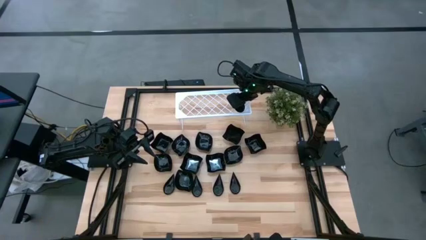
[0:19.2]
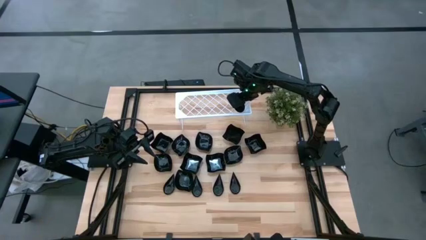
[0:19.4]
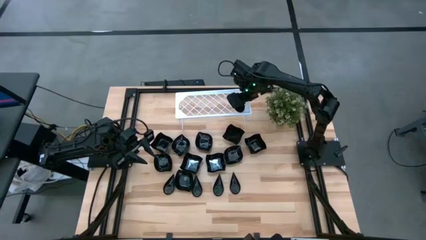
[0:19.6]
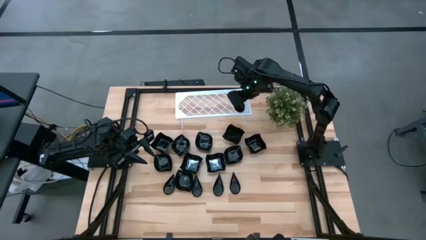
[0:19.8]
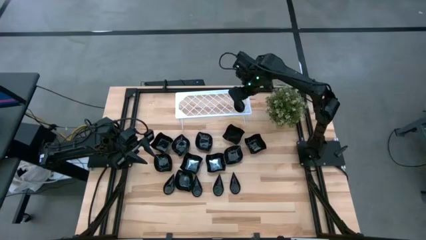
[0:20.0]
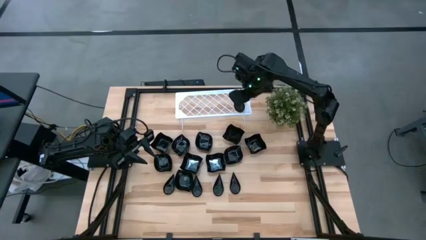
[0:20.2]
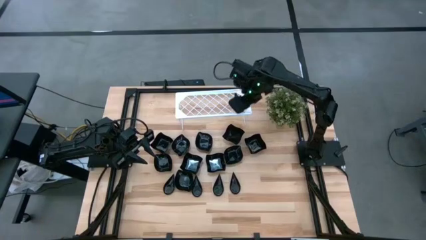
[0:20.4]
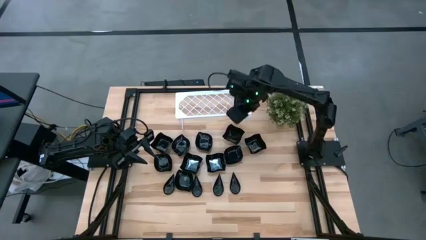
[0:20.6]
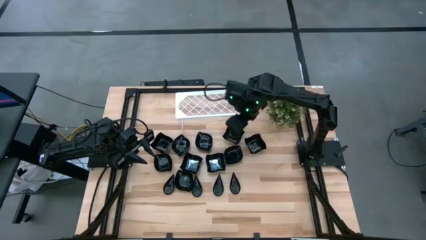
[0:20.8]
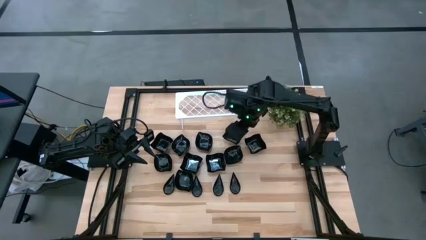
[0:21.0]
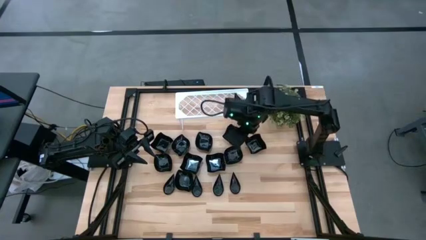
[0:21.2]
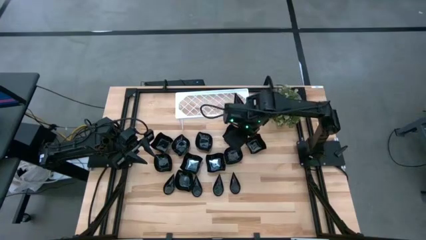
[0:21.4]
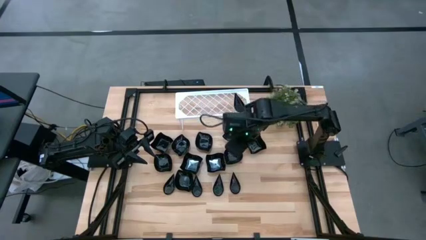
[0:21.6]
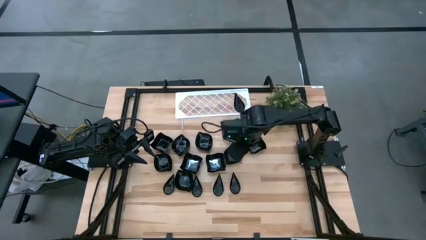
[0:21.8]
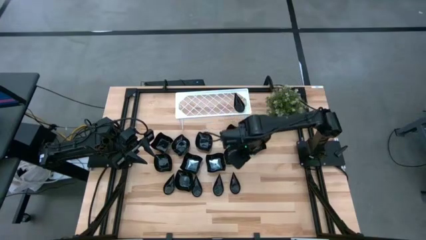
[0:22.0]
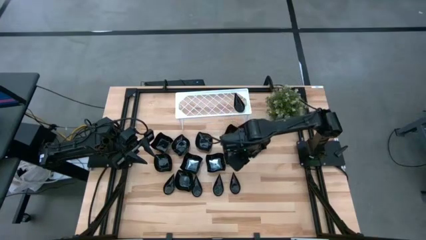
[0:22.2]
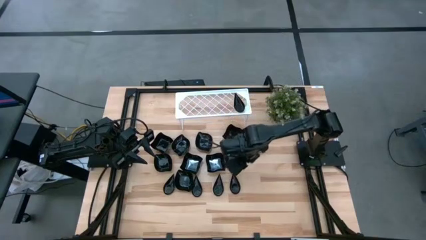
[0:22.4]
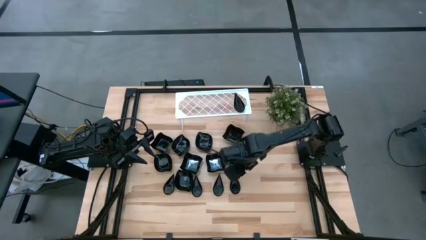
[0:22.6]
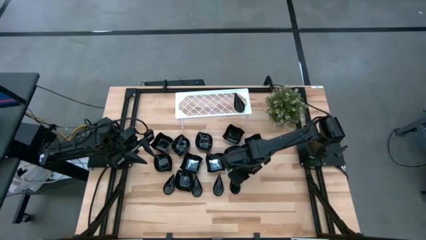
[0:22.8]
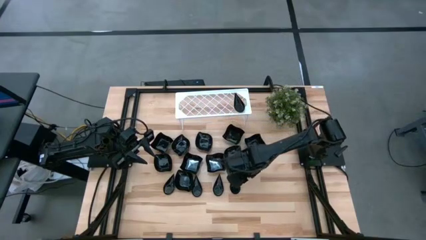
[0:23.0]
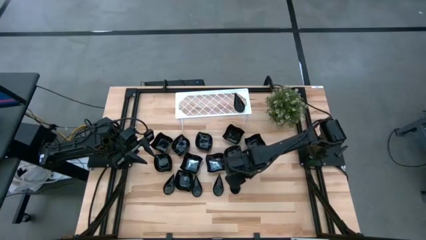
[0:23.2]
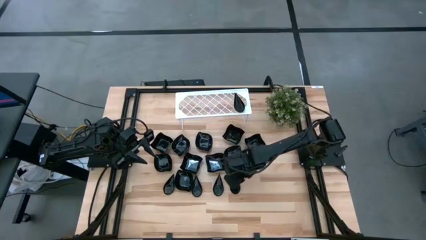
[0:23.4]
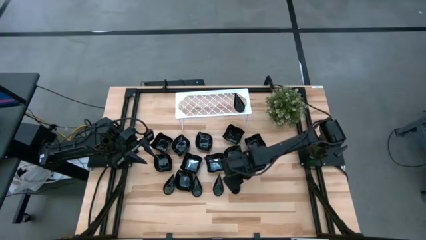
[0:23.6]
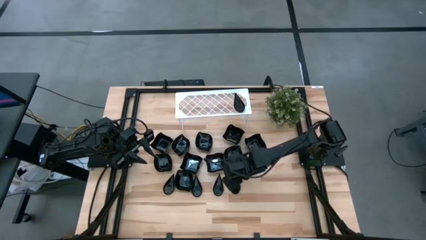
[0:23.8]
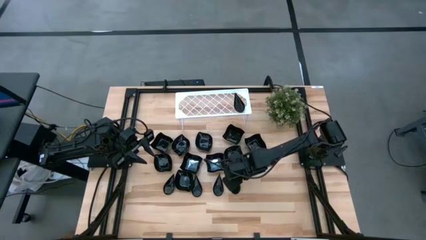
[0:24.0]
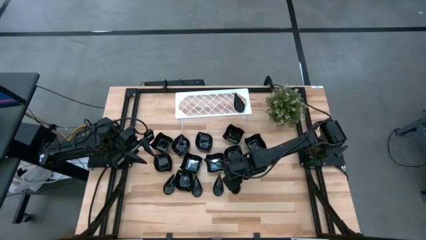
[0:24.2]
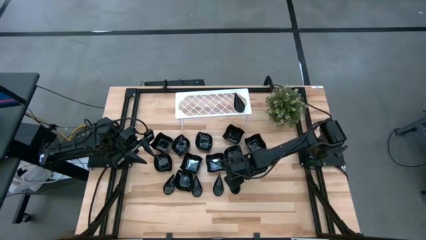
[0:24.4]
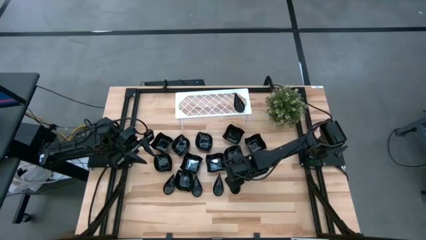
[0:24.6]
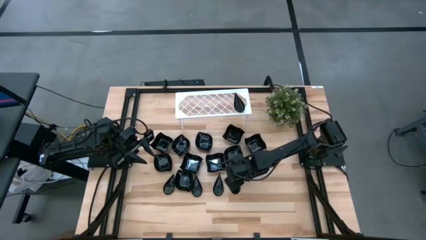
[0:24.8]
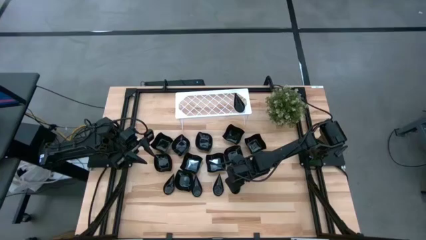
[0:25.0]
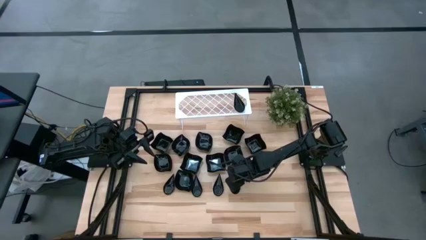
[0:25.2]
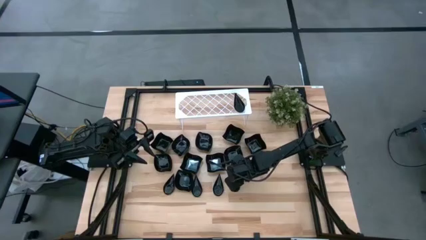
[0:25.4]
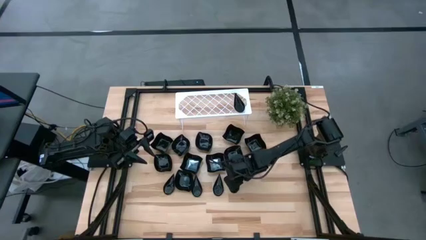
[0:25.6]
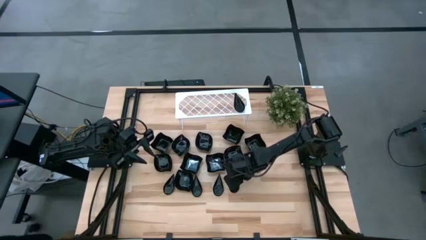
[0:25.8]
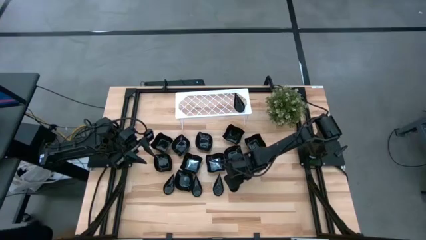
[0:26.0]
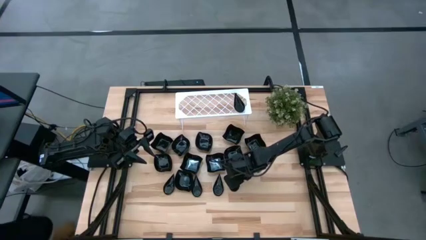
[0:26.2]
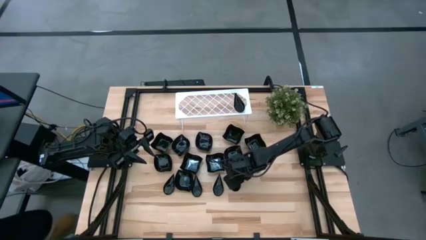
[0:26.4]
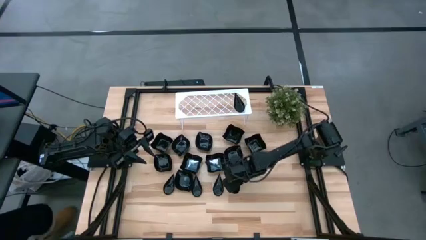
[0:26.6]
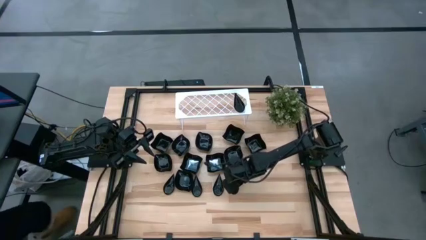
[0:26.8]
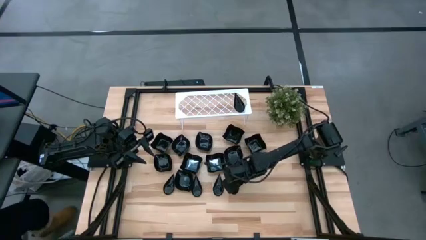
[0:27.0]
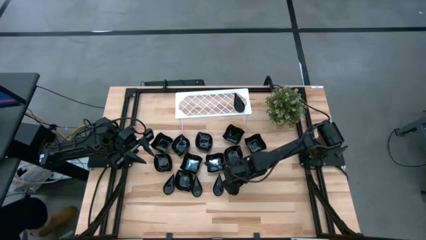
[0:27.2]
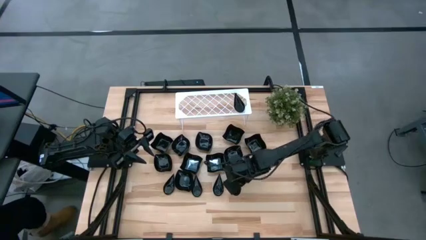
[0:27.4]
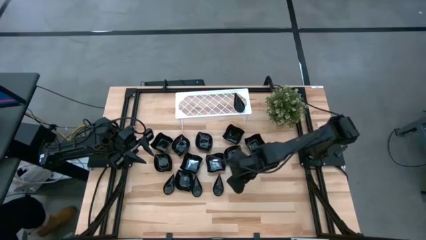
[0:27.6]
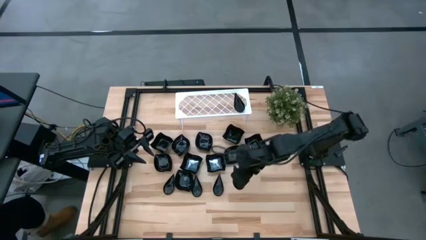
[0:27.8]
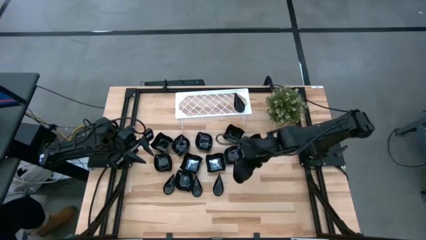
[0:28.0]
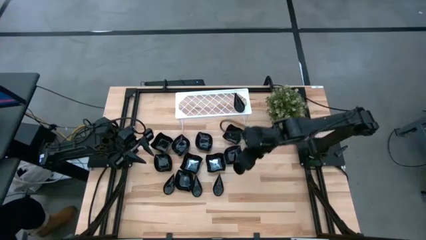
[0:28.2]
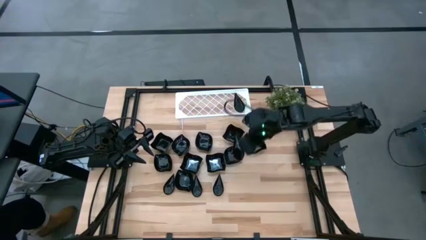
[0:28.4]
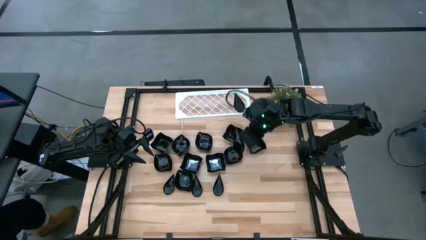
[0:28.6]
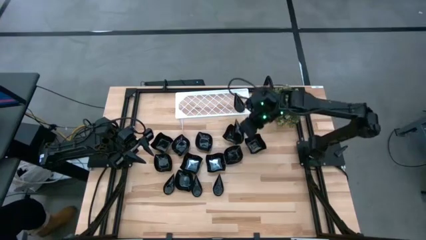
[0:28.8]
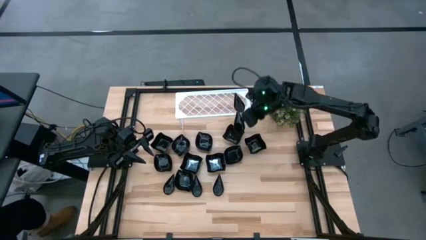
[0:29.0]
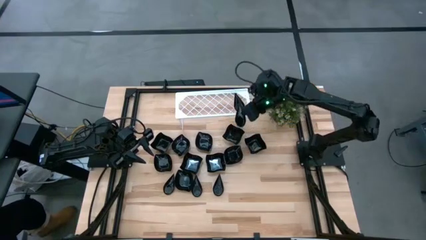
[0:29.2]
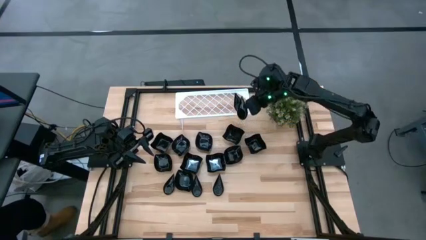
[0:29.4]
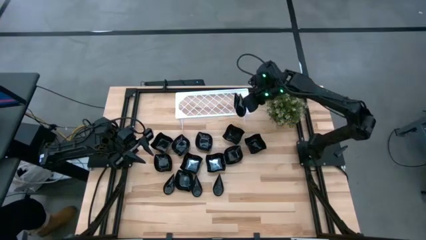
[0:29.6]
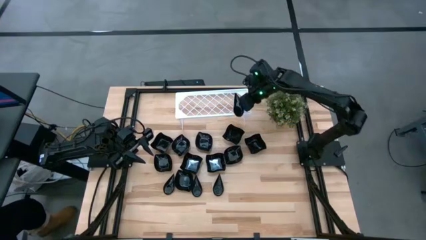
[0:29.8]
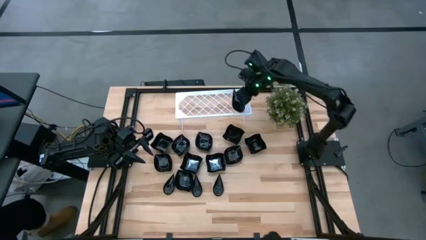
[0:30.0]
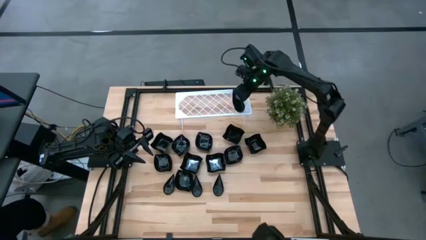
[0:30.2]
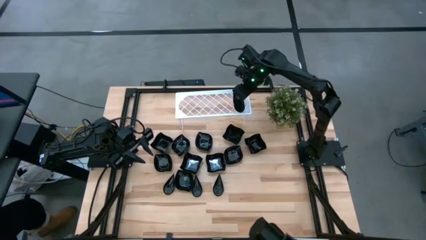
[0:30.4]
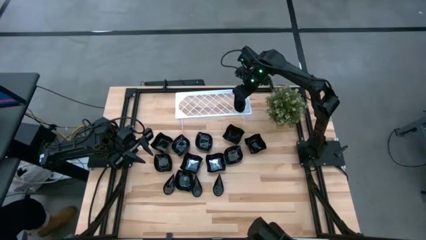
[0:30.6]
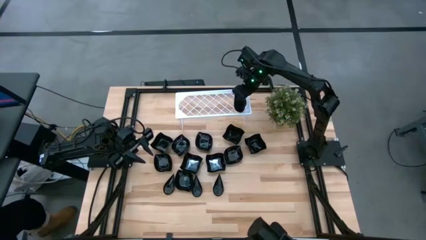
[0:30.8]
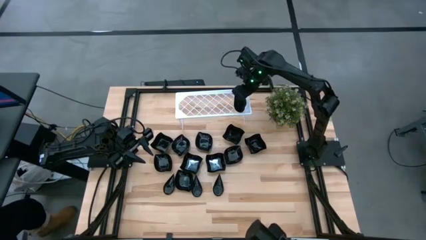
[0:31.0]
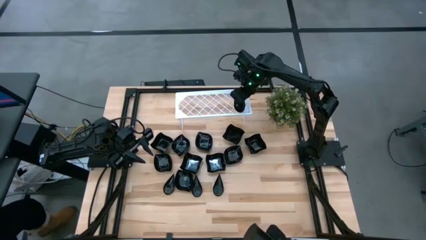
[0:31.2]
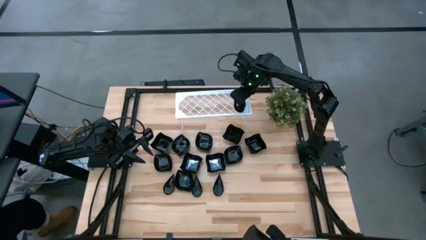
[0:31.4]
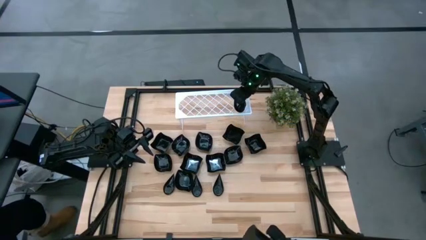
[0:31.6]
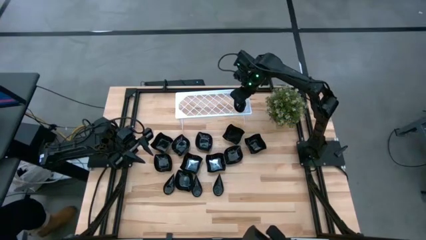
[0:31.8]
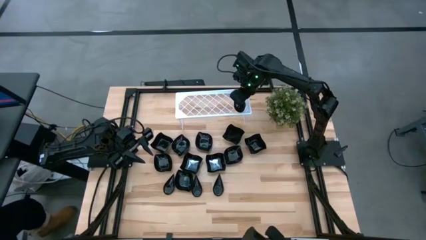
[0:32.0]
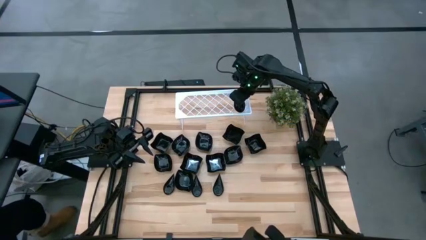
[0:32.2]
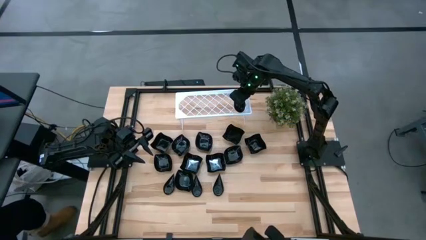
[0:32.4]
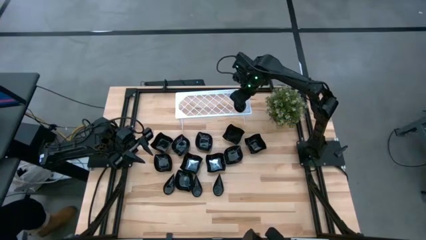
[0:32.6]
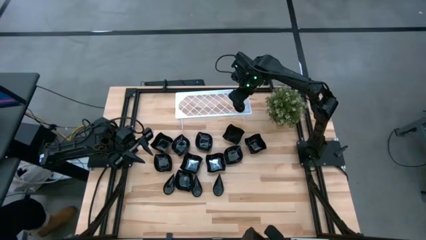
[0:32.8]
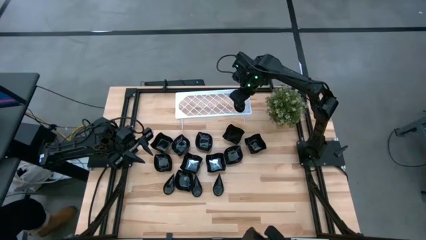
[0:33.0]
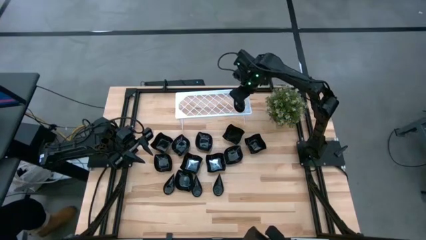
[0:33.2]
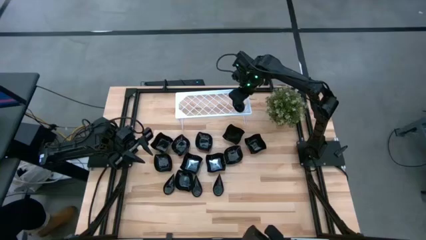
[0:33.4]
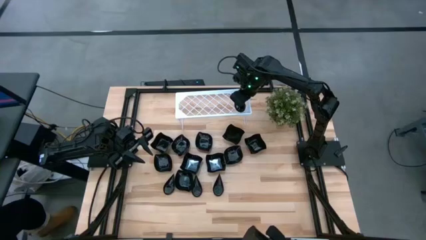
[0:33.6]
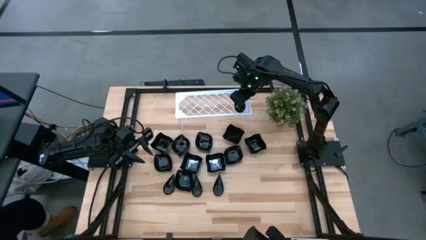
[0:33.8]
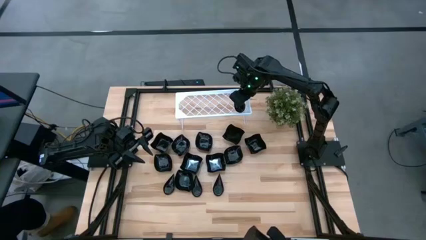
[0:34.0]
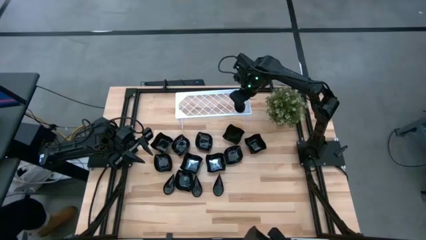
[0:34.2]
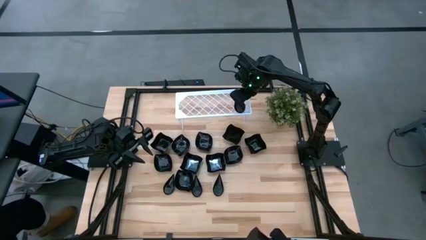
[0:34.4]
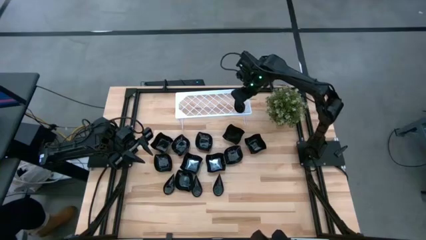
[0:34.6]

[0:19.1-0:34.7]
Task: Pick & Place Mini shaped plates
Stack the drop-shaped plate on top of the drop-shaped plate on the shelf
